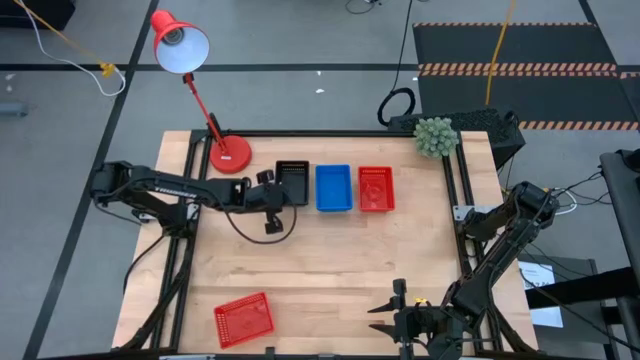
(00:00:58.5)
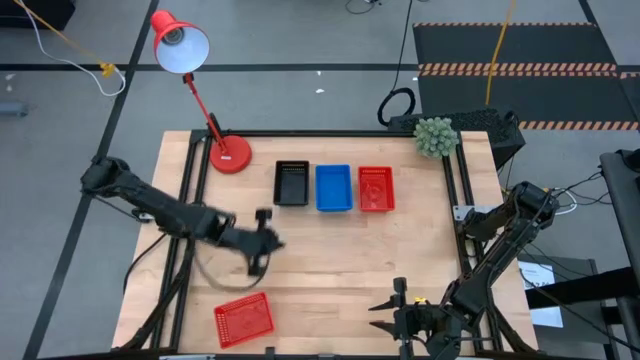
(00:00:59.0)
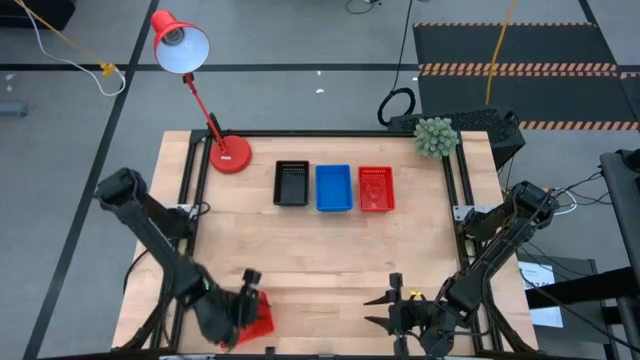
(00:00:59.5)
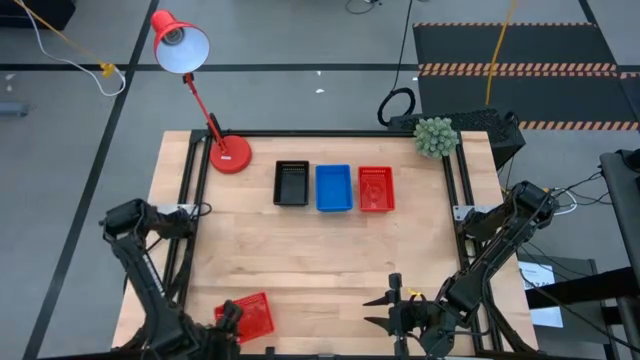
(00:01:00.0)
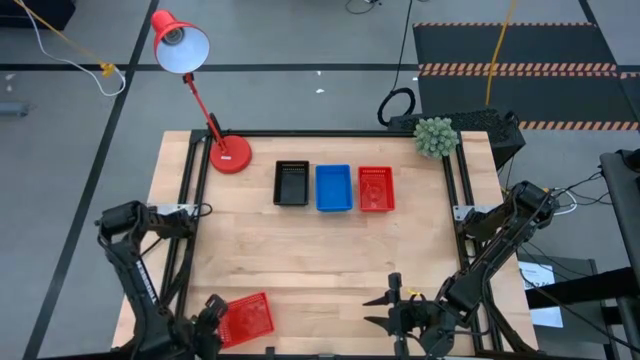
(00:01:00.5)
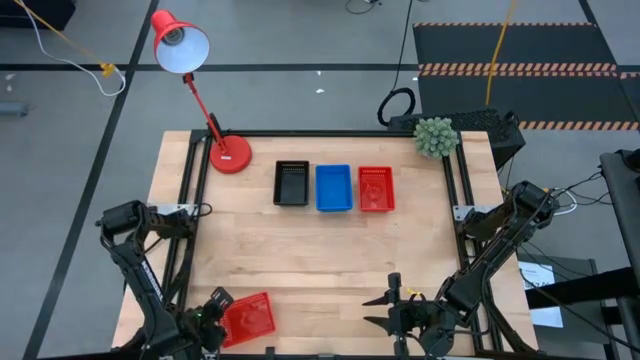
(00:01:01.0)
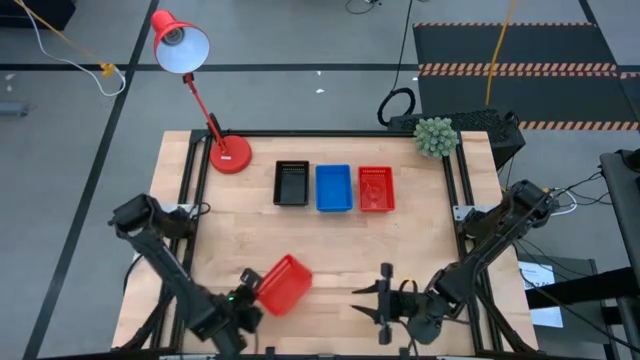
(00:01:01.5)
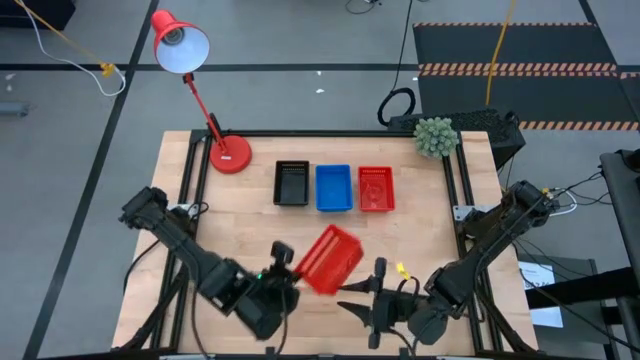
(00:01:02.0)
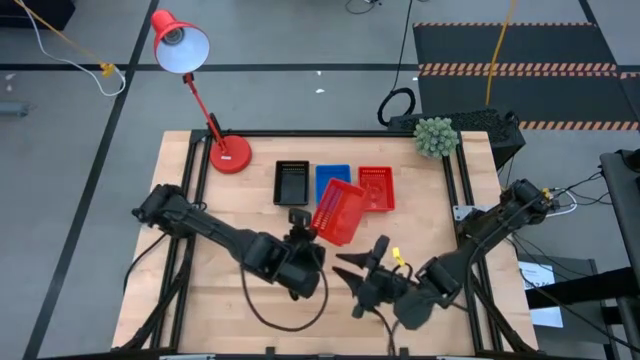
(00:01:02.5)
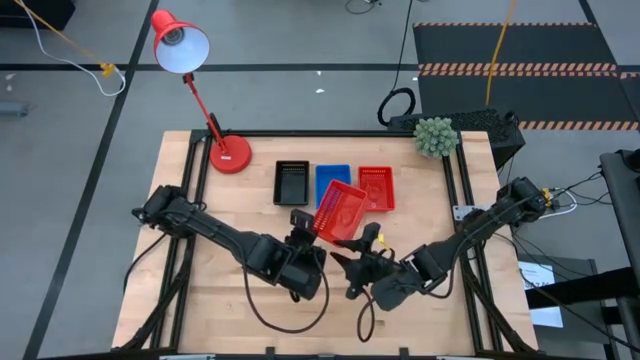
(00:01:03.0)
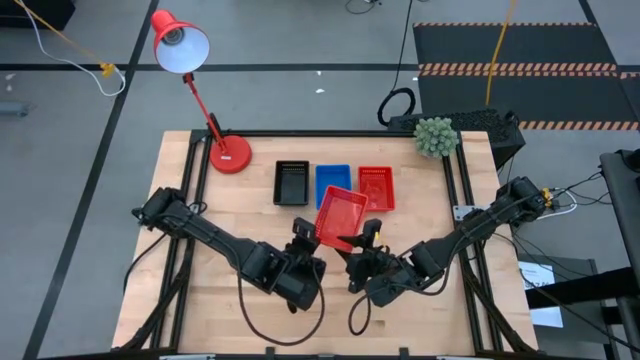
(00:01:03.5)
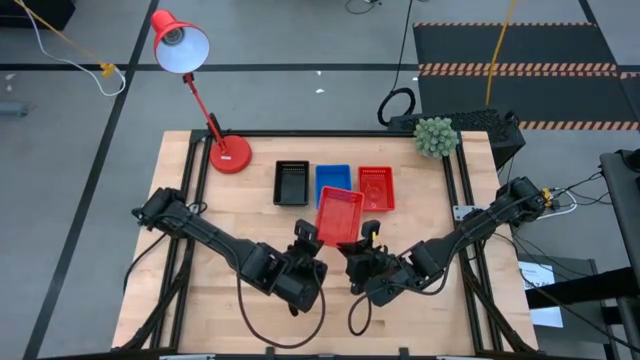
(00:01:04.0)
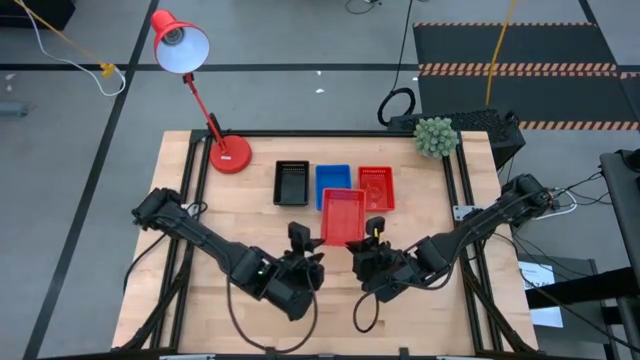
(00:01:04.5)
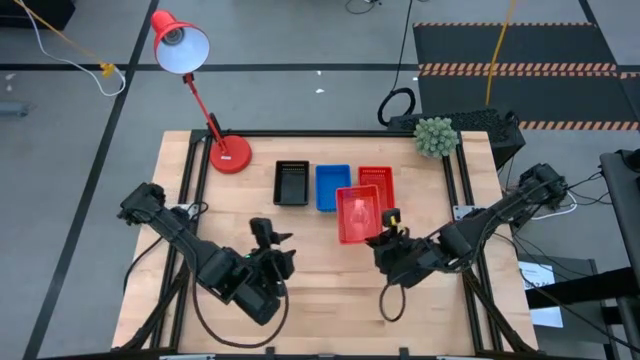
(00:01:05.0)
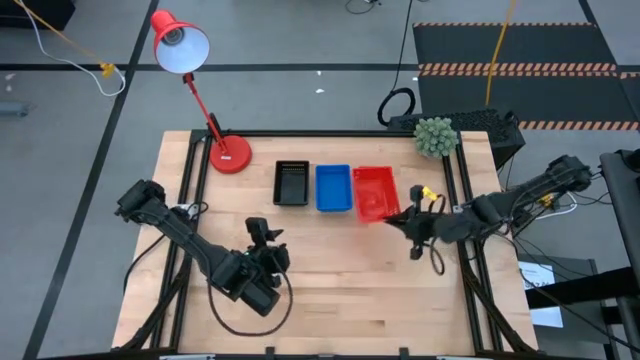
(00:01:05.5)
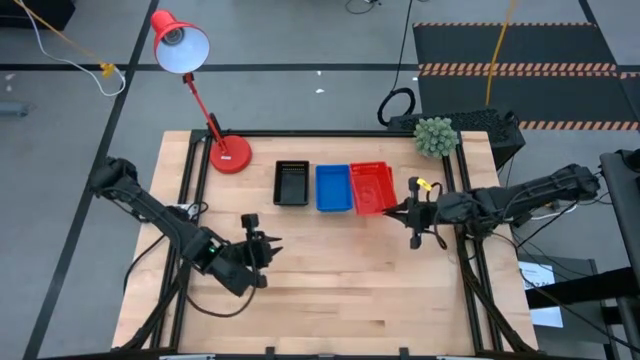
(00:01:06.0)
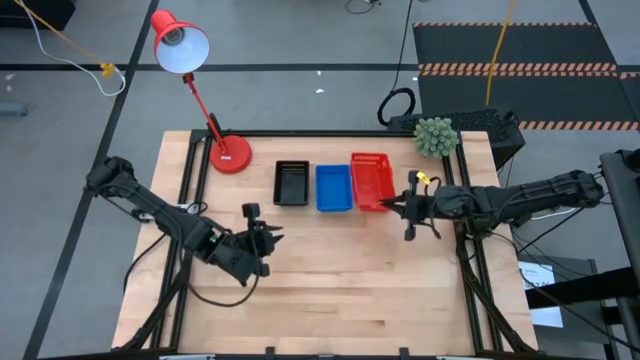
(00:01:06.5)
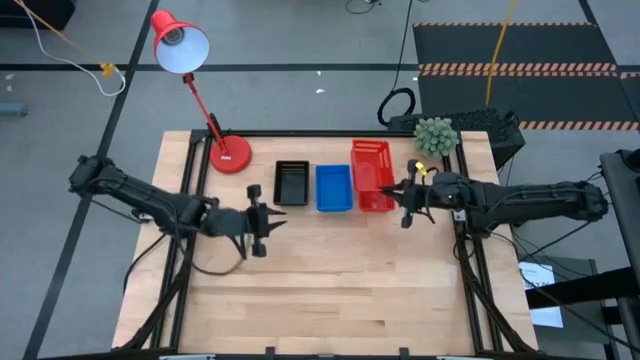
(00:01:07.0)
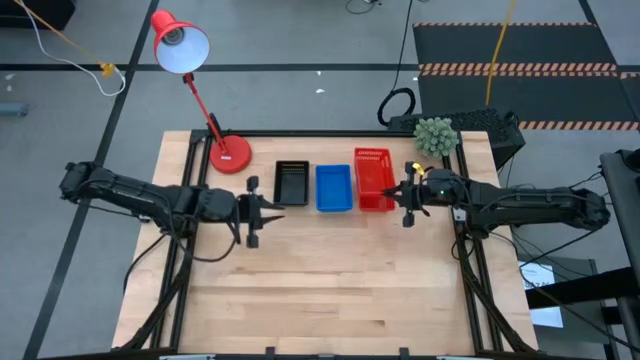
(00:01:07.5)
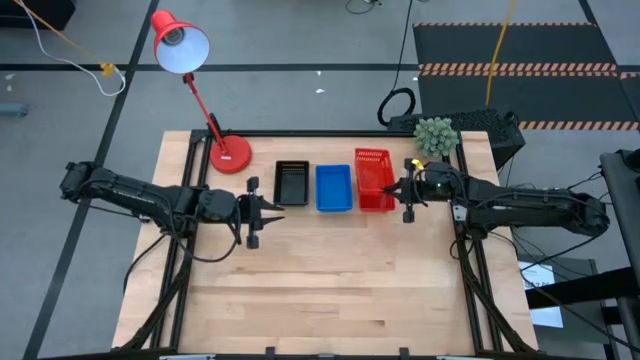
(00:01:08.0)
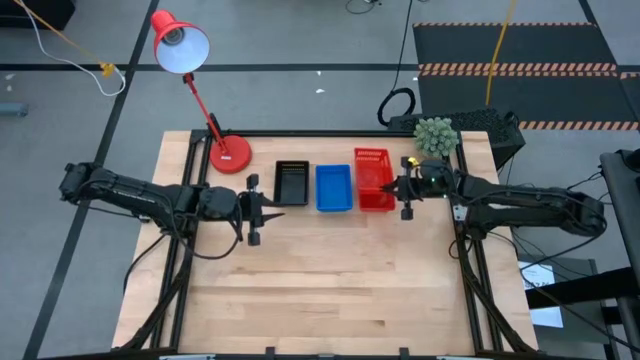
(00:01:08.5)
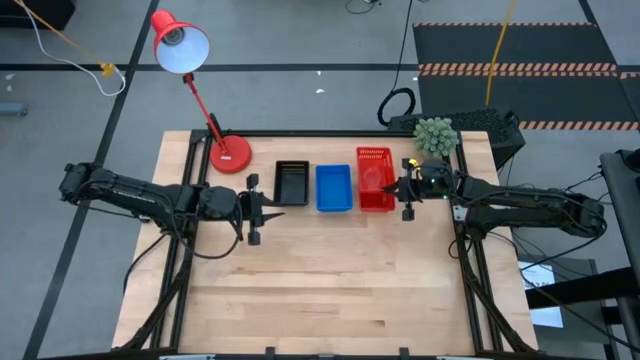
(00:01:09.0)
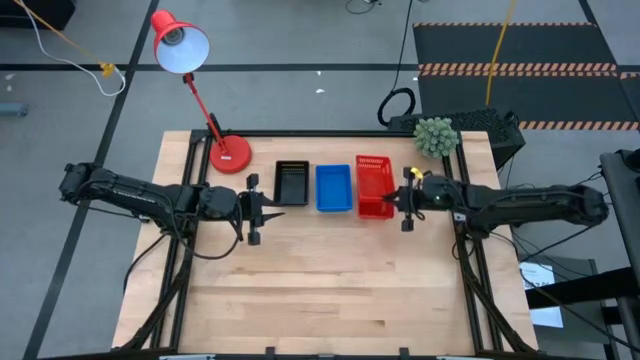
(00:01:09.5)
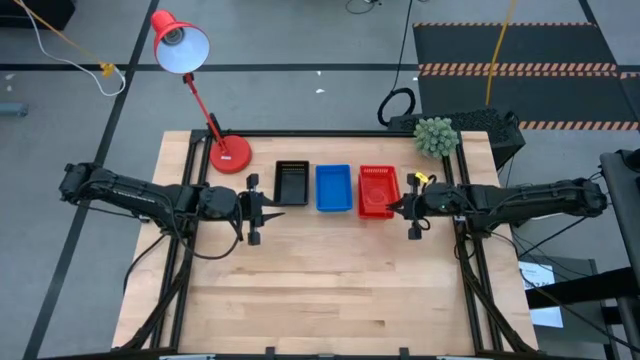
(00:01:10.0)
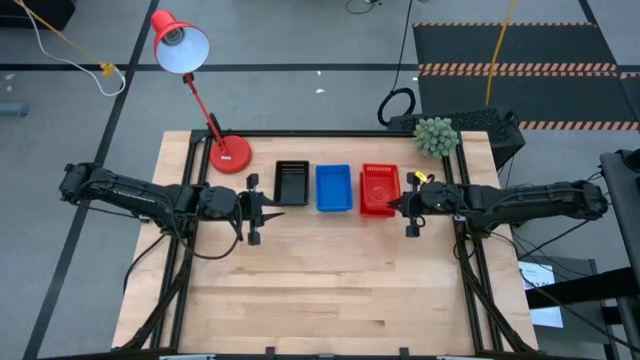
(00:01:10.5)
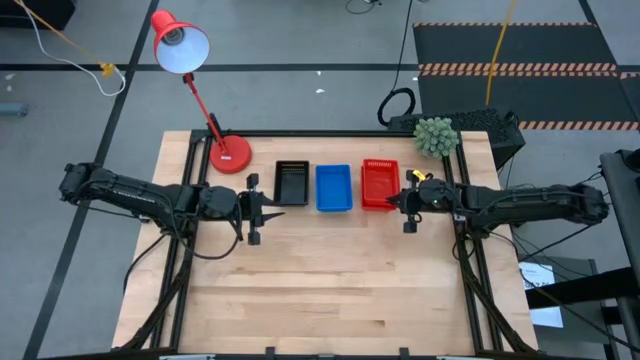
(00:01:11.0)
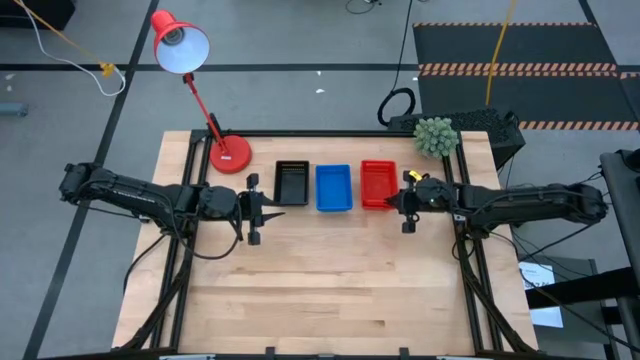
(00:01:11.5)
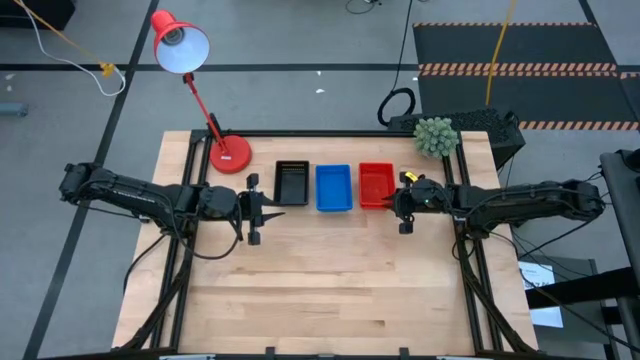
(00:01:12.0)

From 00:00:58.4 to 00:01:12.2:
Stack the red bin on the stacked red bins

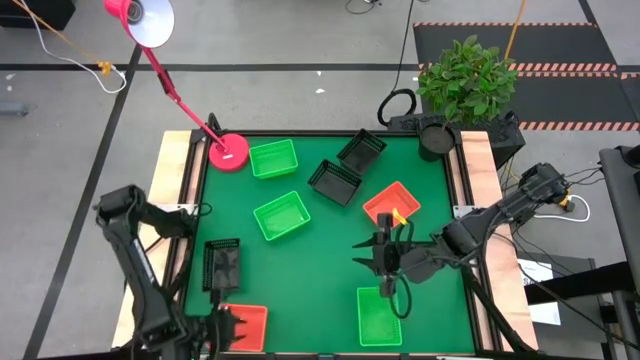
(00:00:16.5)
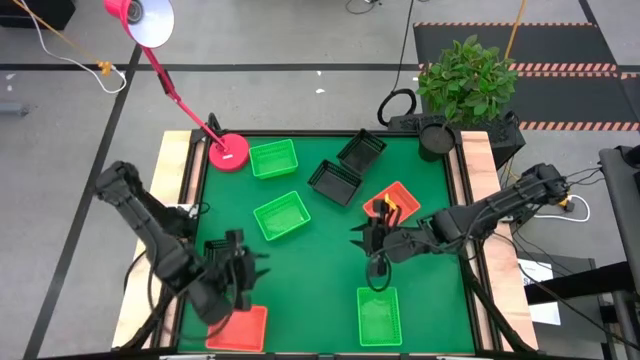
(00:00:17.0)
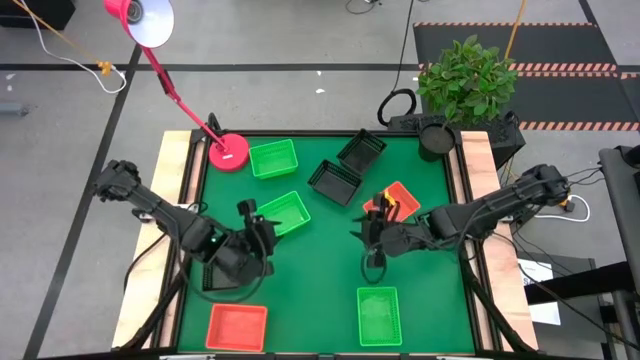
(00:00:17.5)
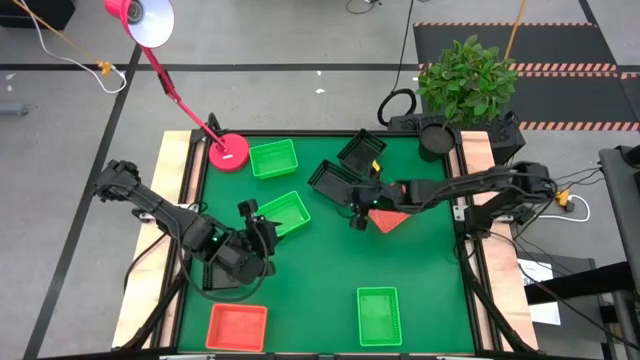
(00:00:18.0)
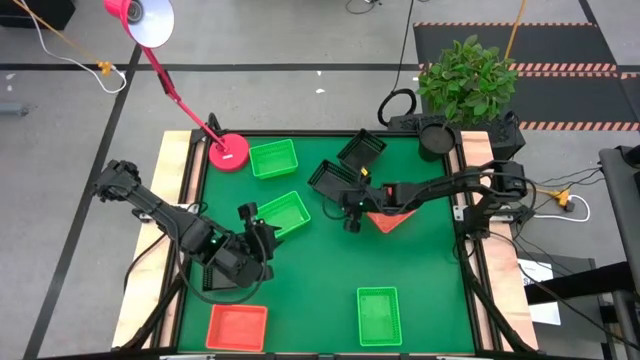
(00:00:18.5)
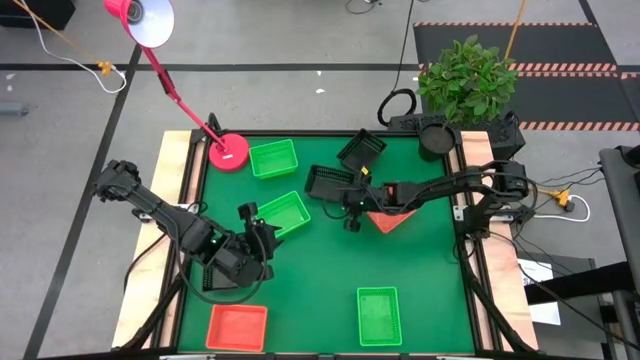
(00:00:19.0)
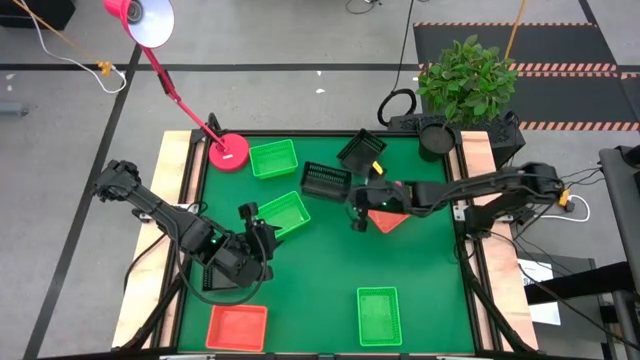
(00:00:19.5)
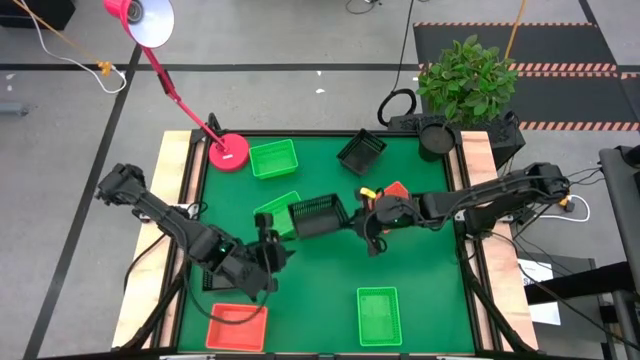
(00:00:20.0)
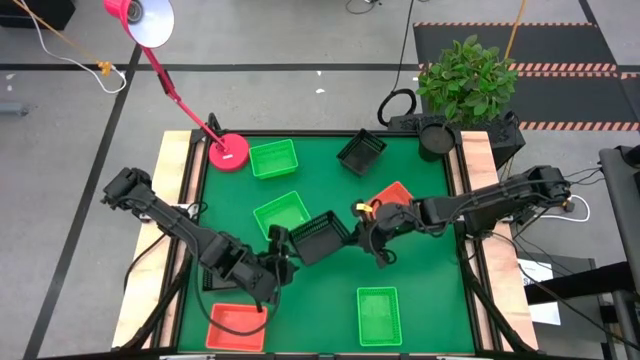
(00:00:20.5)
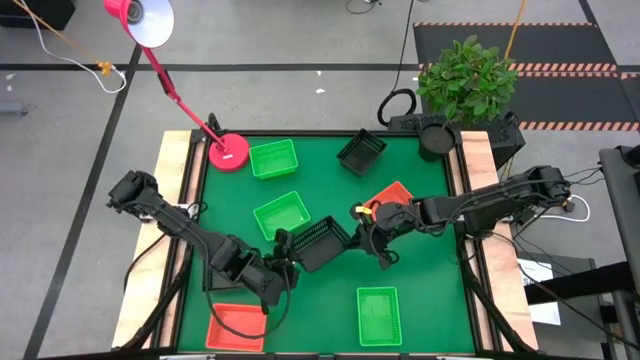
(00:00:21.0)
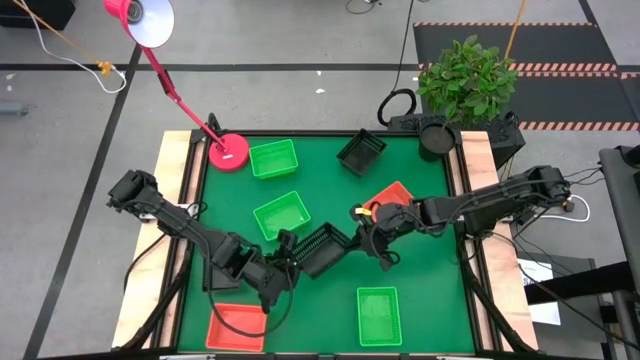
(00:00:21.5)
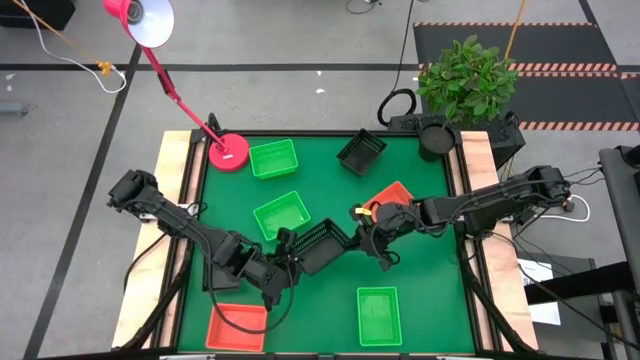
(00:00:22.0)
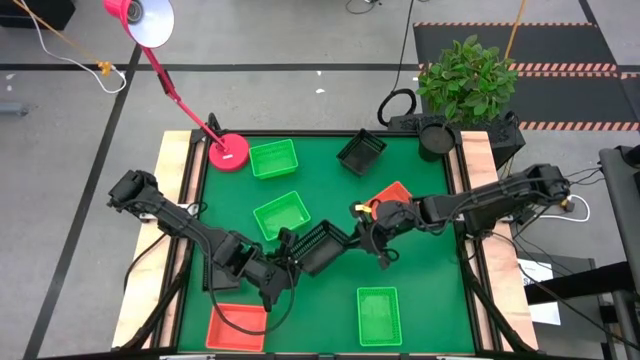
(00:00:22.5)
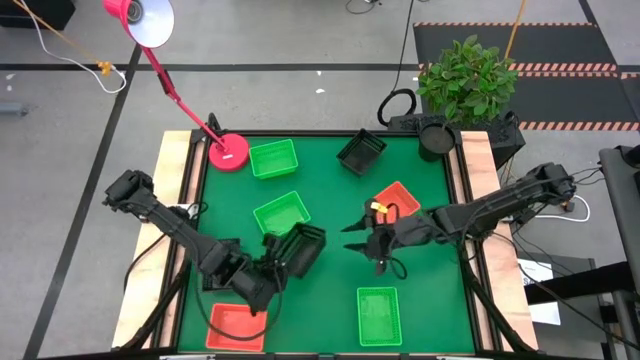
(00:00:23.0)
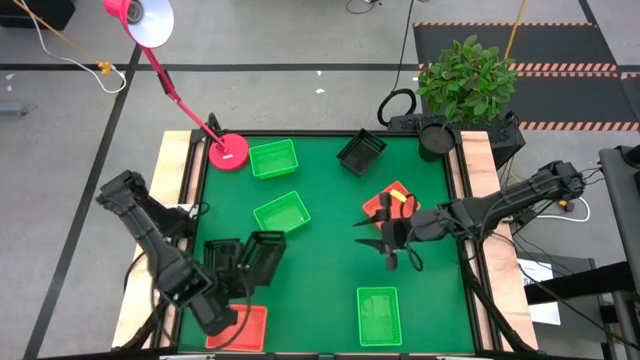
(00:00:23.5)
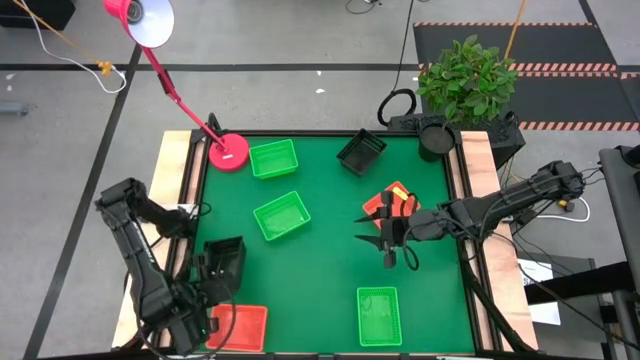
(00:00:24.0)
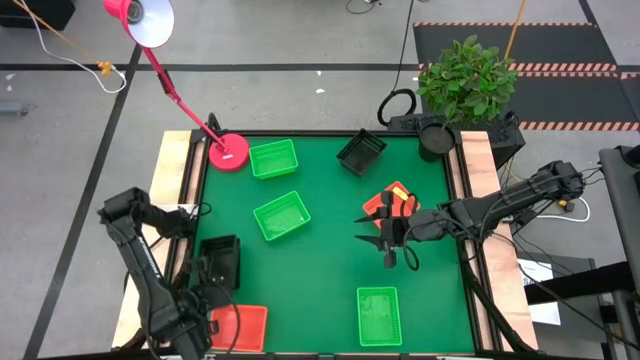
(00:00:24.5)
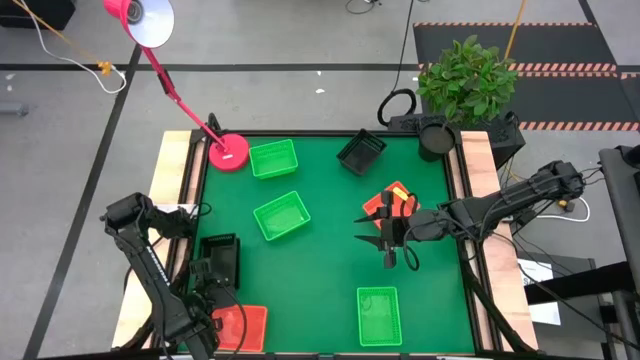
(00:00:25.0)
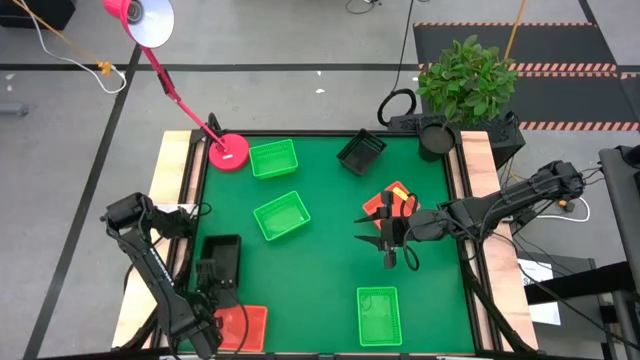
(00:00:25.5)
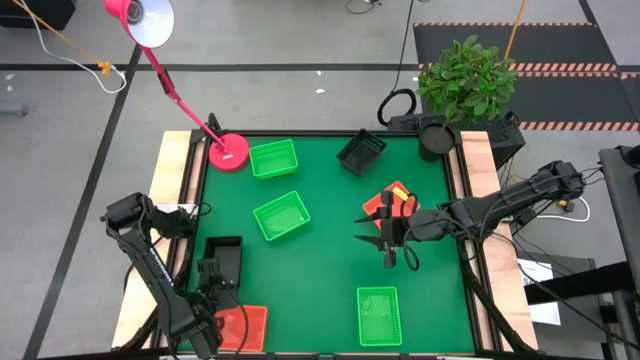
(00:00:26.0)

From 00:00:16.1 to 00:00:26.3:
Stack the middle black bin on the bottom black bin
